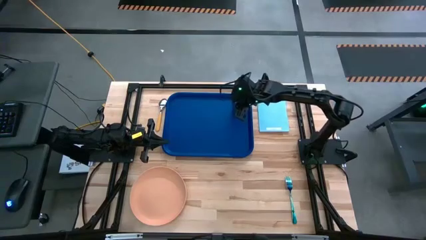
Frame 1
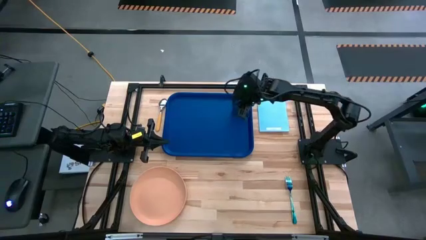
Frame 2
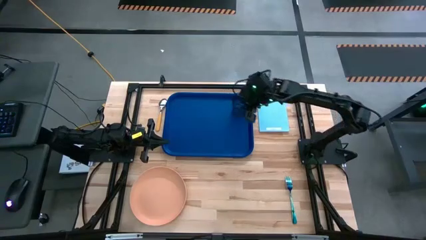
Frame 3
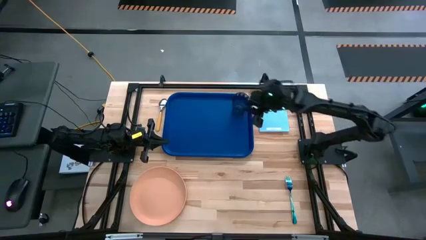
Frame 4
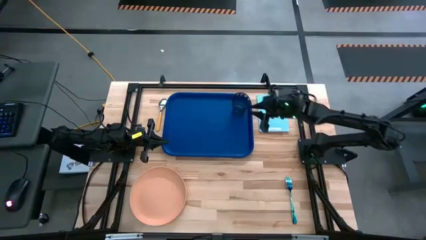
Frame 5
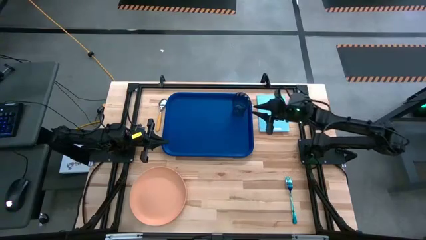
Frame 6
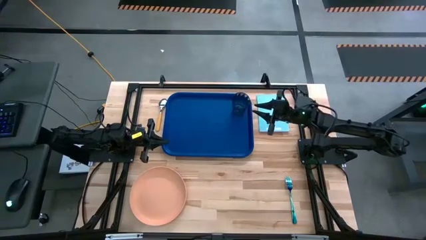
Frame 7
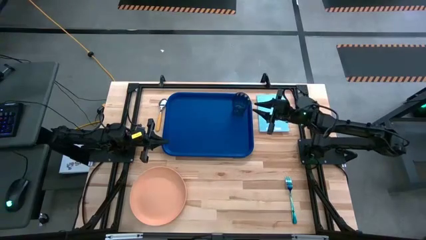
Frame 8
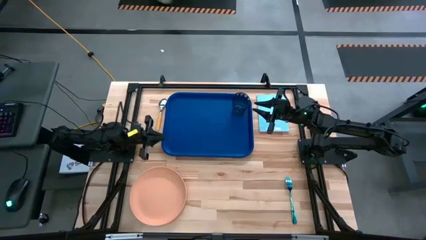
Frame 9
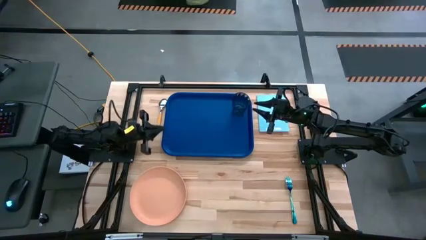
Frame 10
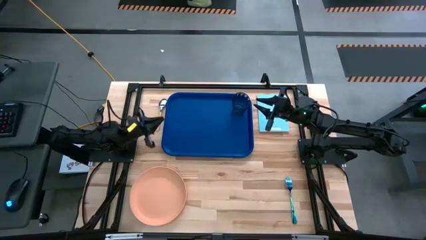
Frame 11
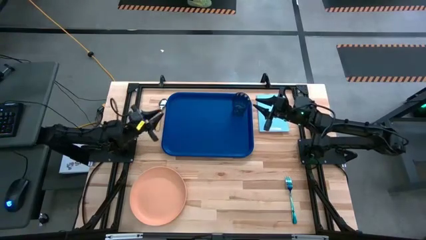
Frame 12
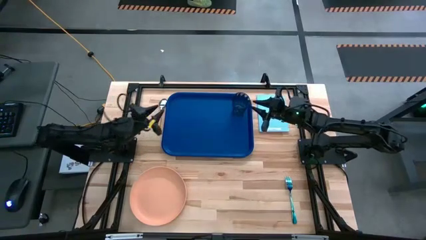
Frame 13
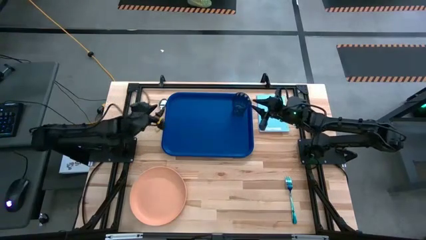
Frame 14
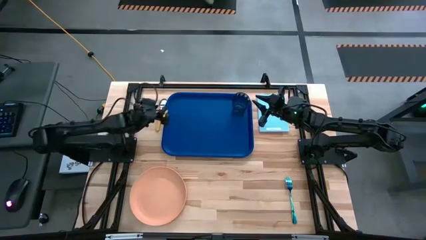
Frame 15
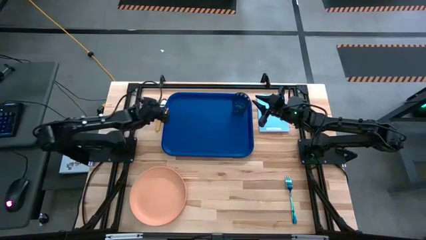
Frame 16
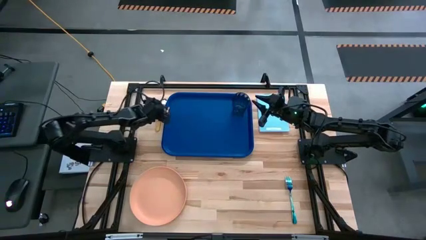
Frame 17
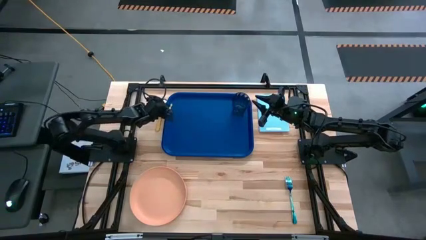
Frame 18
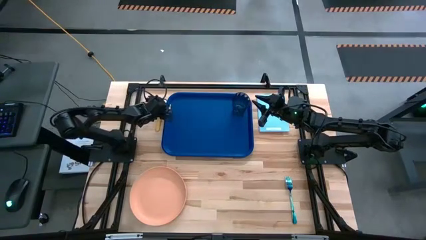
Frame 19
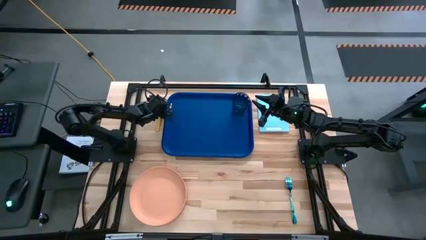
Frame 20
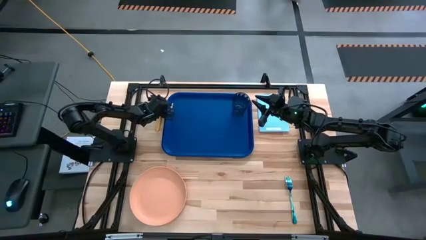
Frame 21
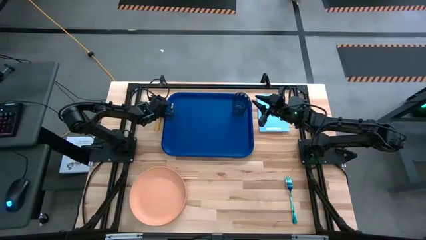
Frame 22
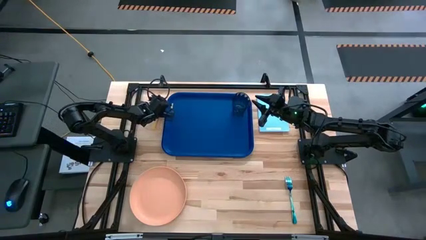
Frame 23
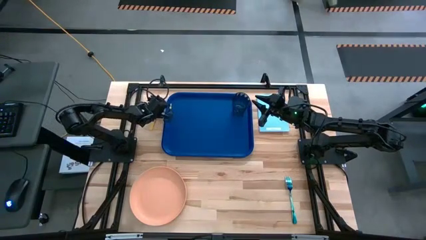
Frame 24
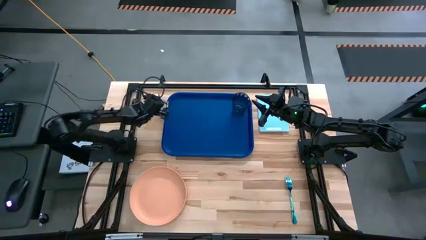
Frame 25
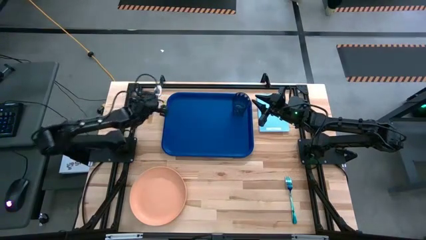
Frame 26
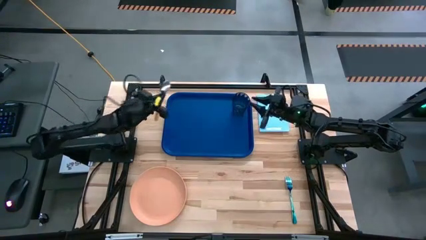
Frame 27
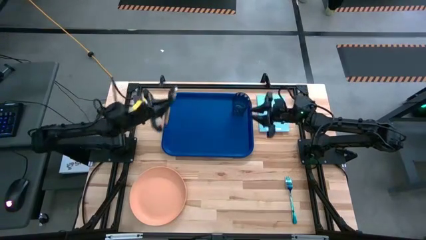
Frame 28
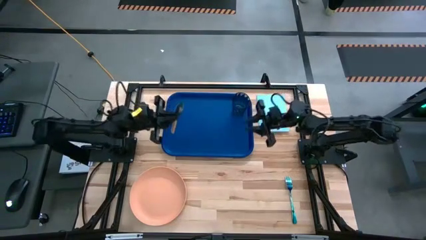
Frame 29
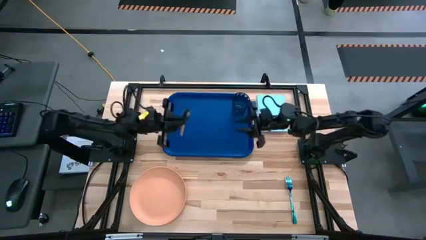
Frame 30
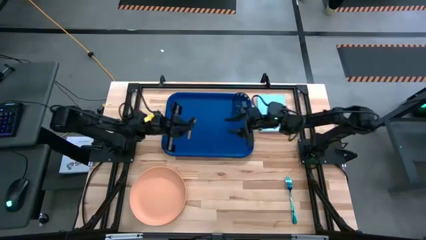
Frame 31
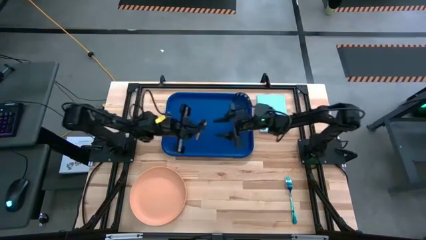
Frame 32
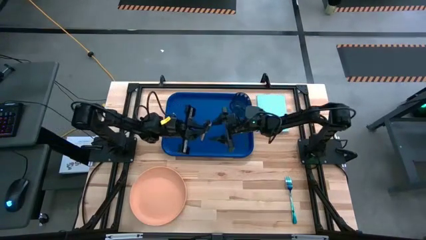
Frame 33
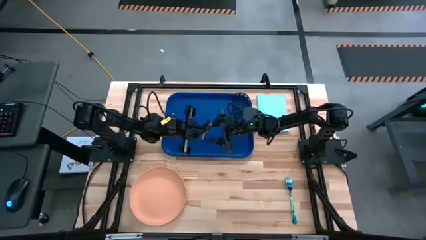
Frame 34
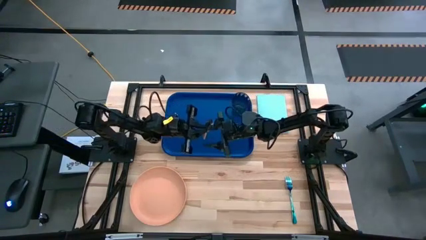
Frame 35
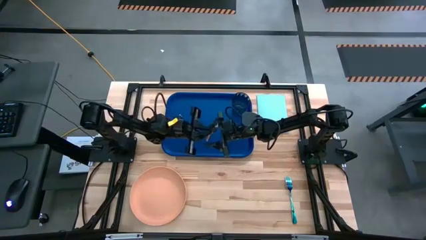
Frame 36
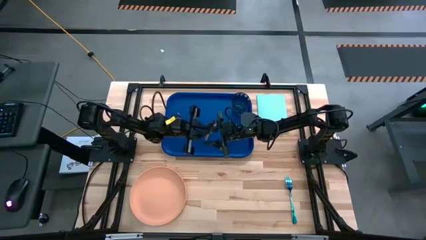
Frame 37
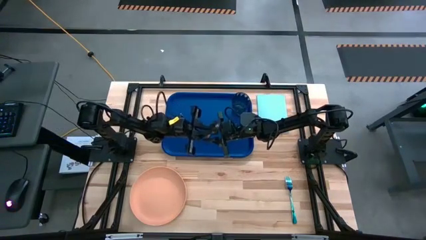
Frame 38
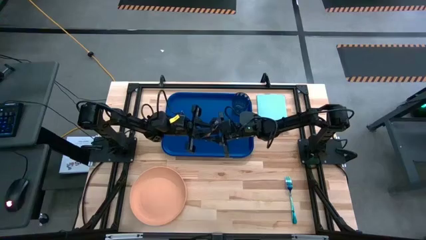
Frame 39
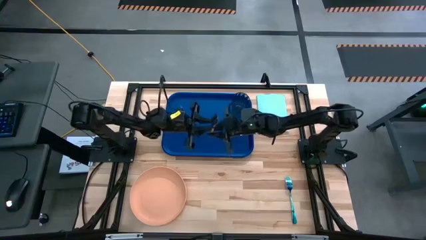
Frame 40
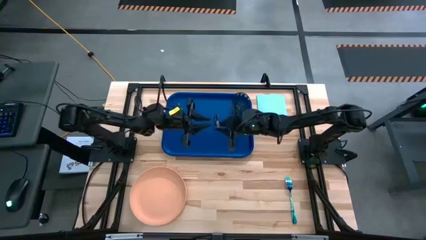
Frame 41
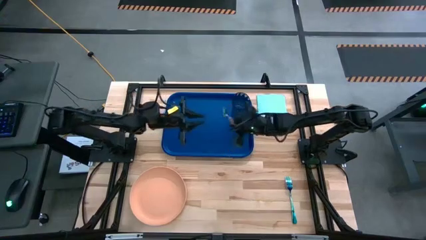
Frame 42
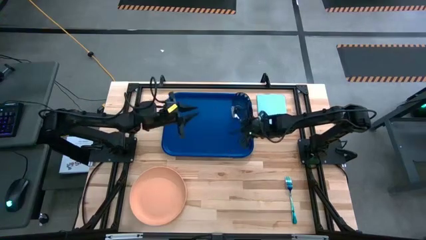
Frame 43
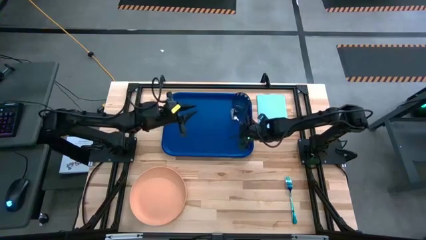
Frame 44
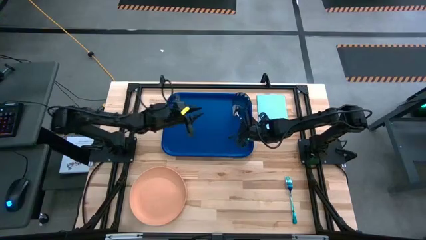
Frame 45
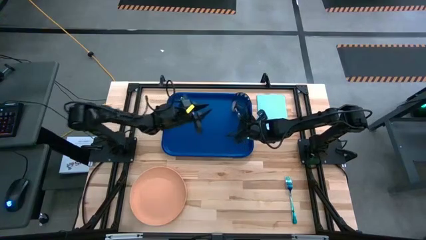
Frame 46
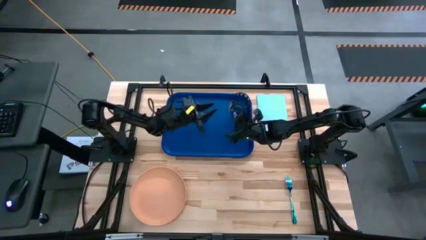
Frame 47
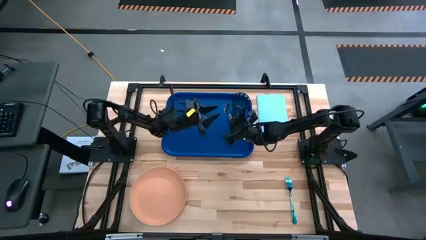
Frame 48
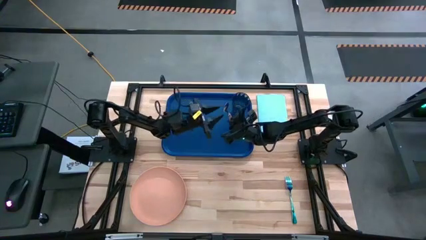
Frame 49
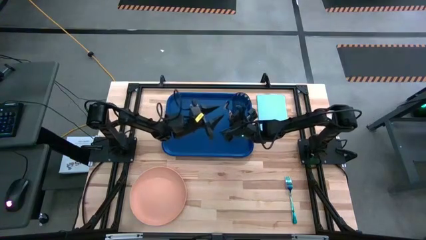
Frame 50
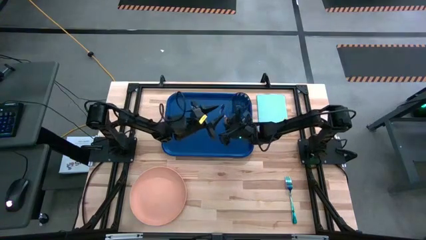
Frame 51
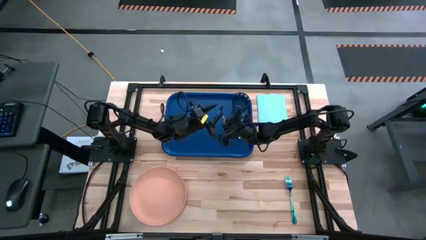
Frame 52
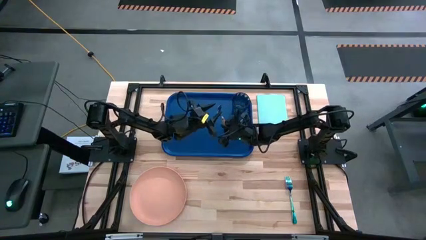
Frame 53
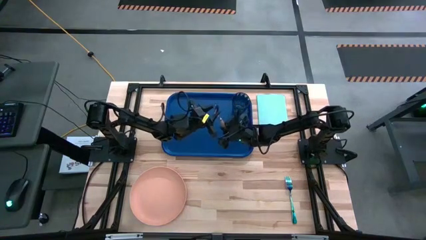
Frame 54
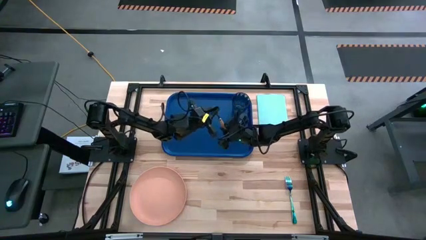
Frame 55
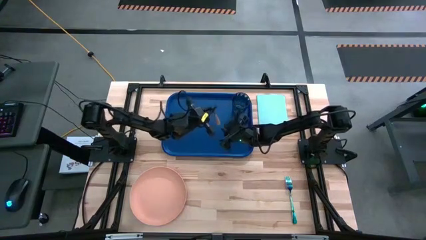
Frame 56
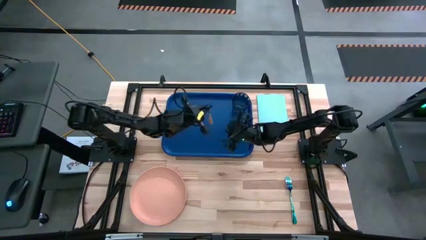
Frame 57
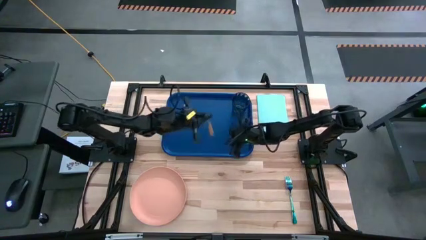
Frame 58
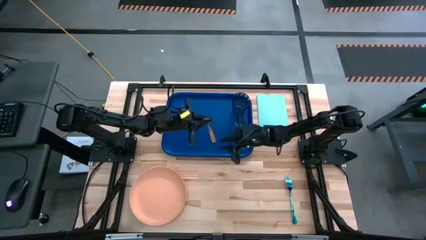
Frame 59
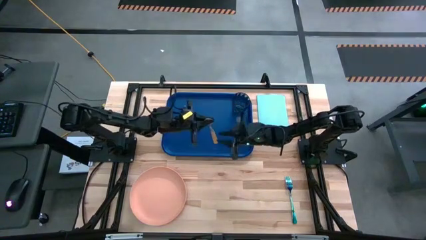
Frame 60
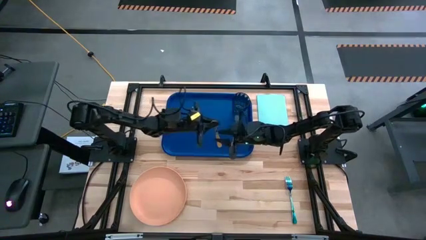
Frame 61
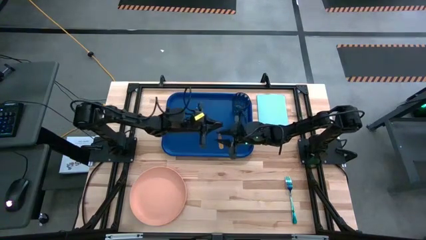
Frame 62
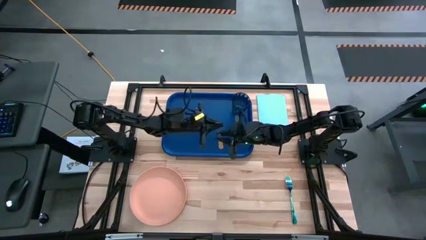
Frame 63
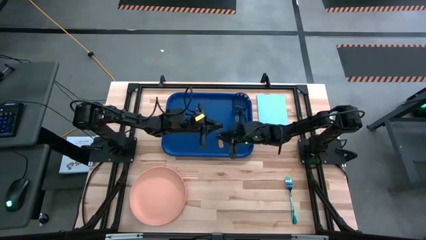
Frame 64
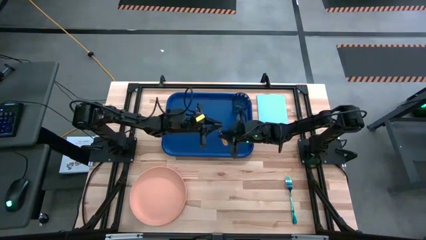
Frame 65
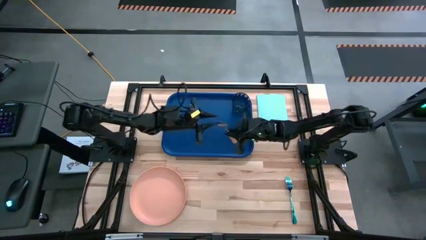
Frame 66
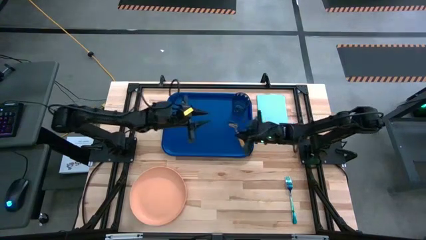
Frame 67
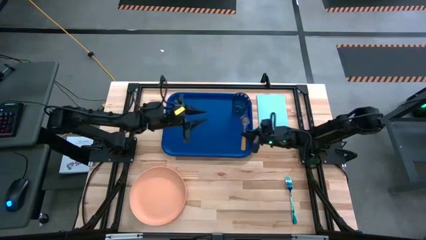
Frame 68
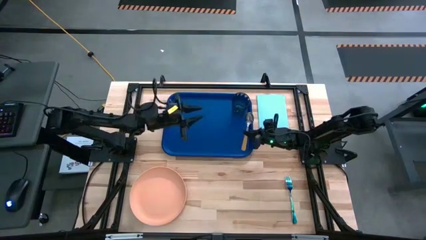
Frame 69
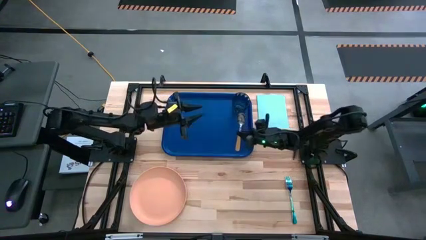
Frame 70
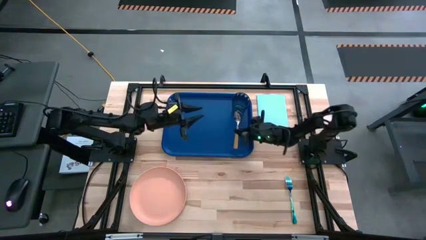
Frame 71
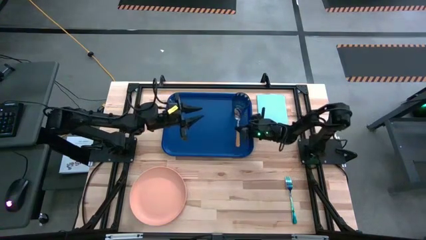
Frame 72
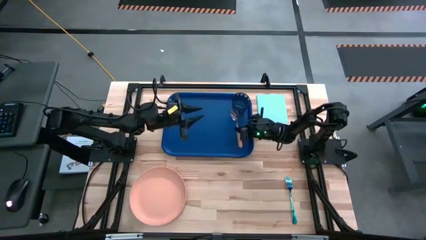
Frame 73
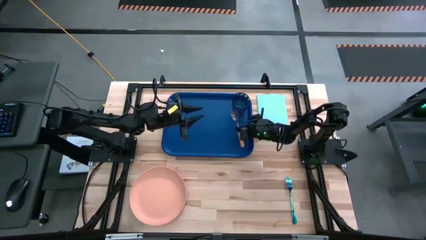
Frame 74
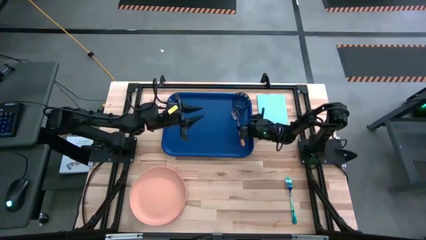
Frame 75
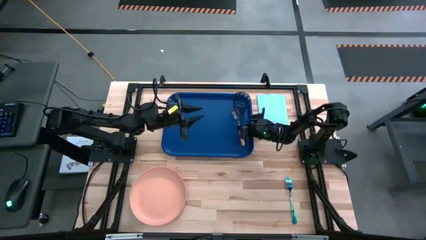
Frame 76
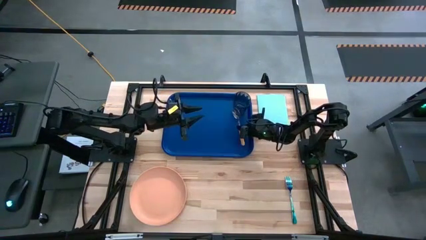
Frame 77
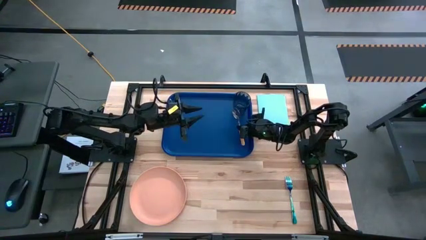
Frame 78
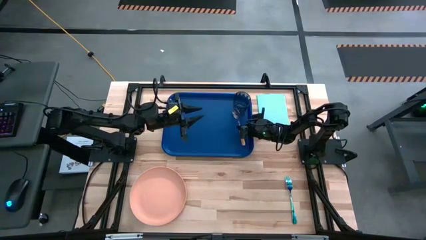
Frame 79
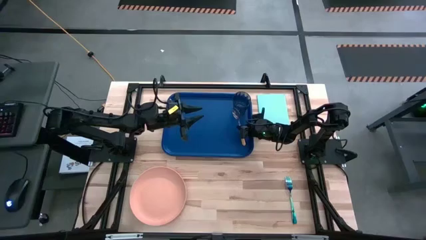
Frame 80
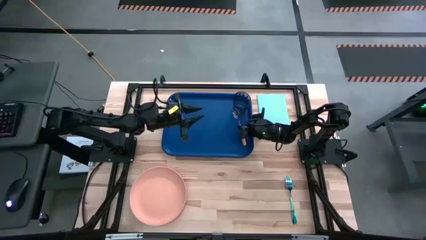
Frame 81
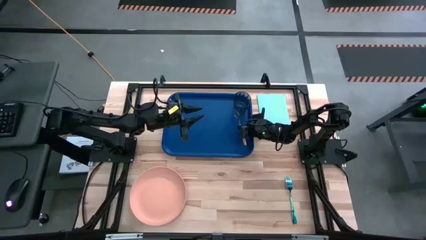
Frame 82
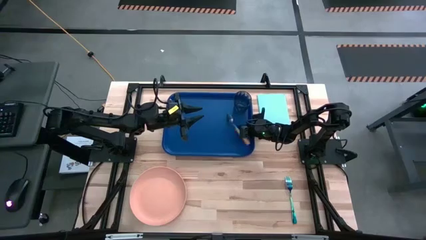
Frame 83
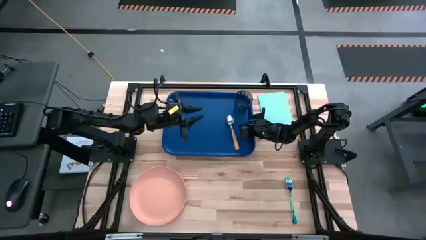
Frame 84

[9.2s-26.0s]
Task: Pick and place plate/cup/fork/spoon on tray
Put the spoon to the left of the blue serving tray
